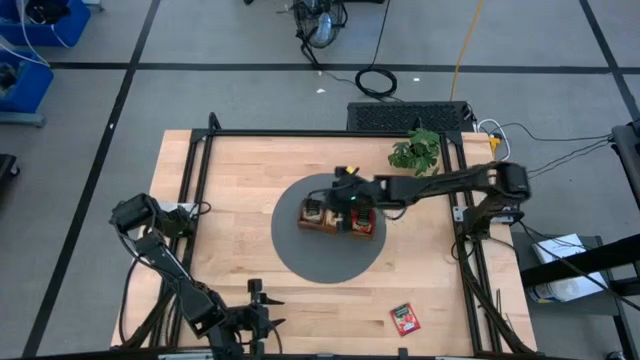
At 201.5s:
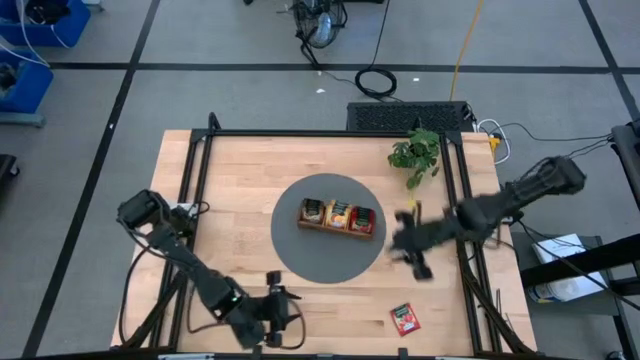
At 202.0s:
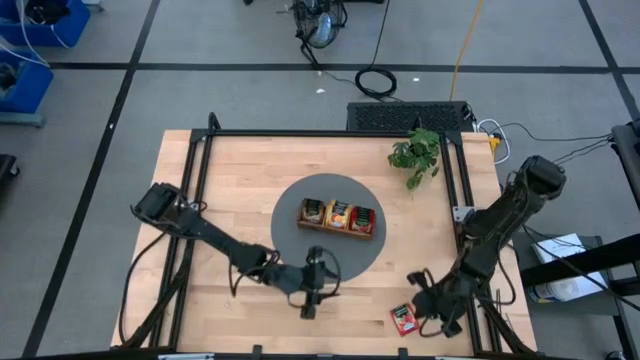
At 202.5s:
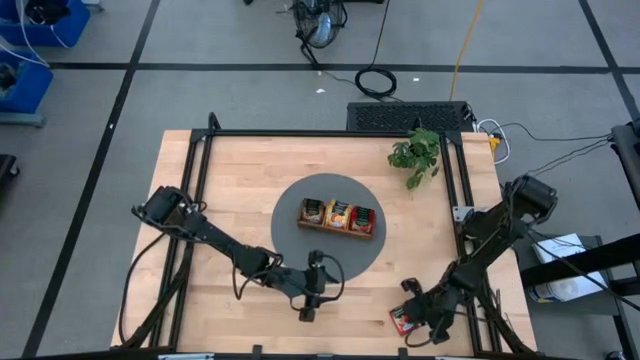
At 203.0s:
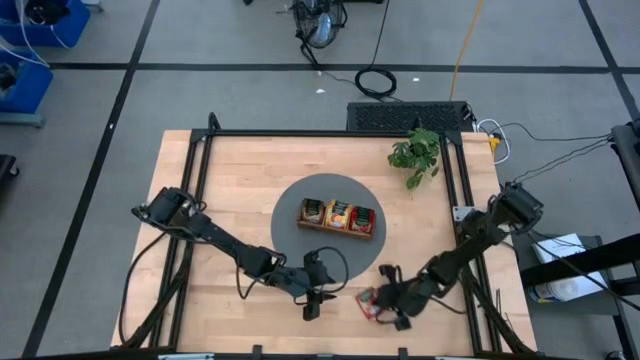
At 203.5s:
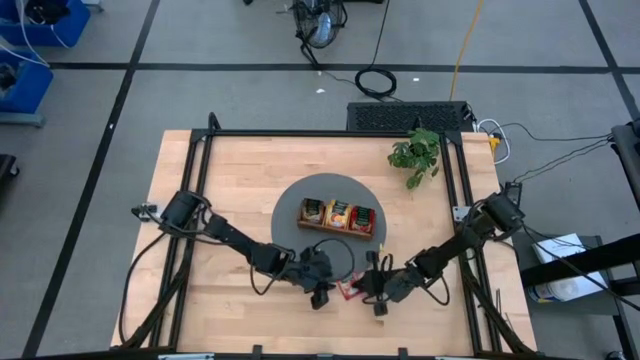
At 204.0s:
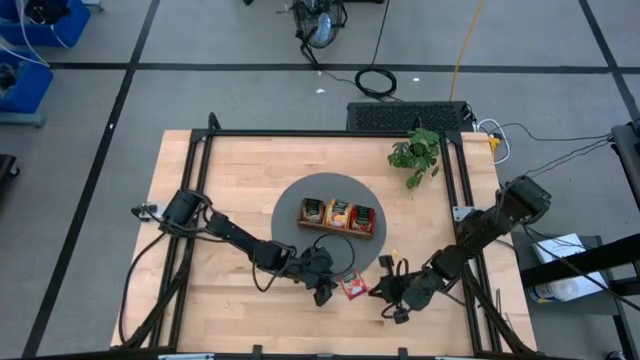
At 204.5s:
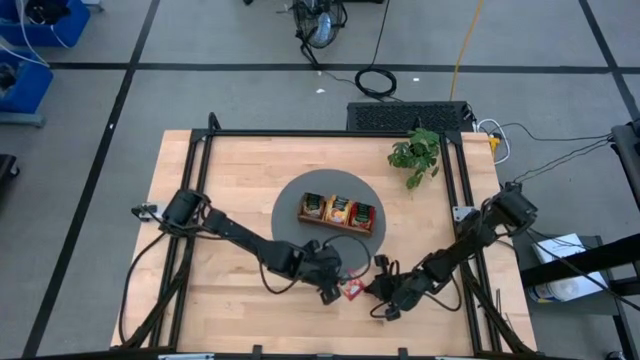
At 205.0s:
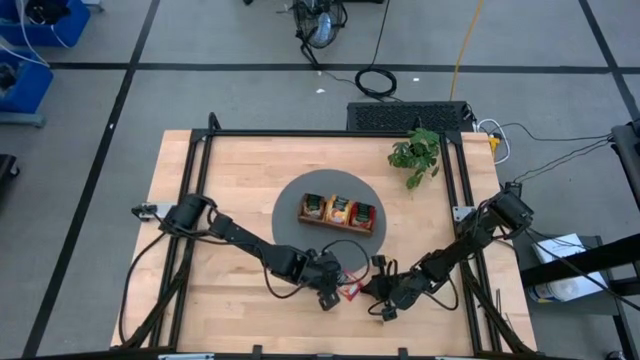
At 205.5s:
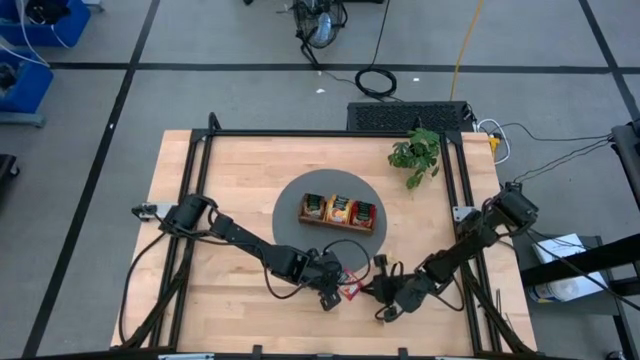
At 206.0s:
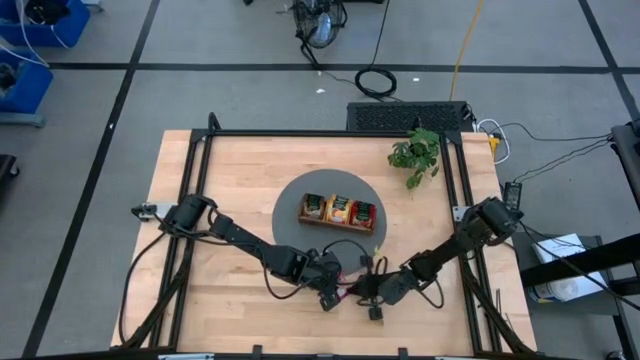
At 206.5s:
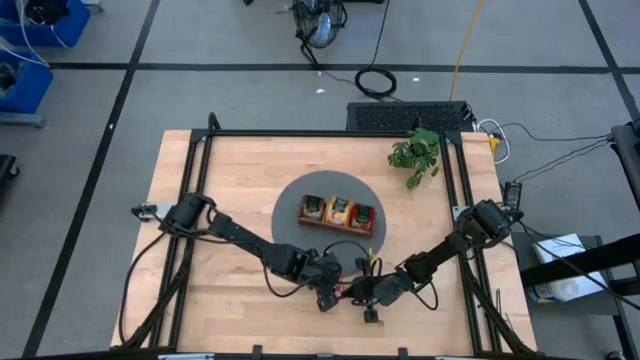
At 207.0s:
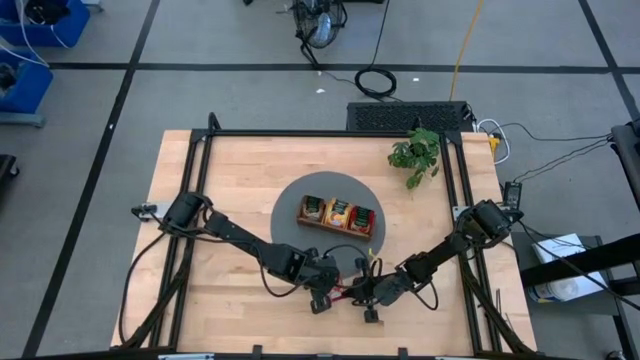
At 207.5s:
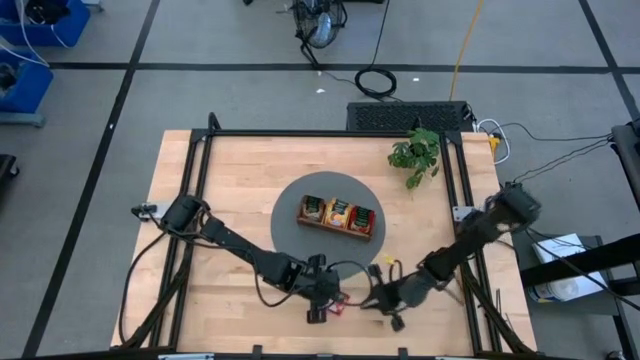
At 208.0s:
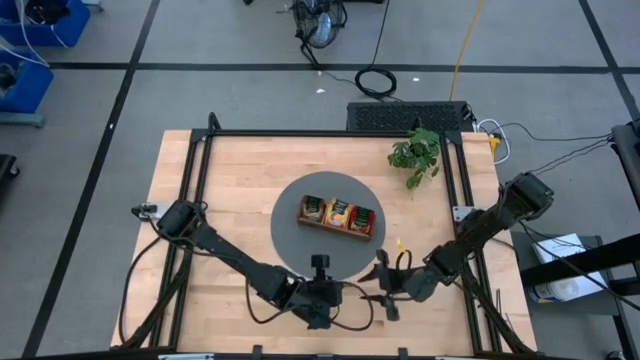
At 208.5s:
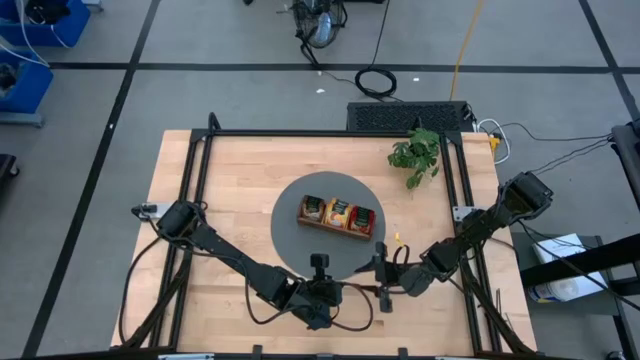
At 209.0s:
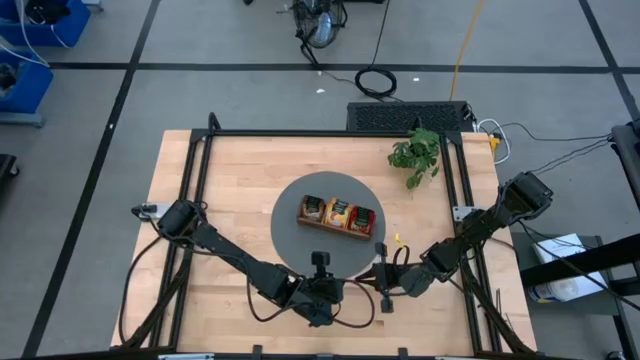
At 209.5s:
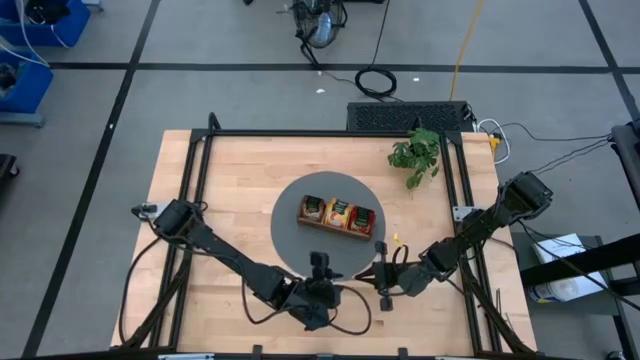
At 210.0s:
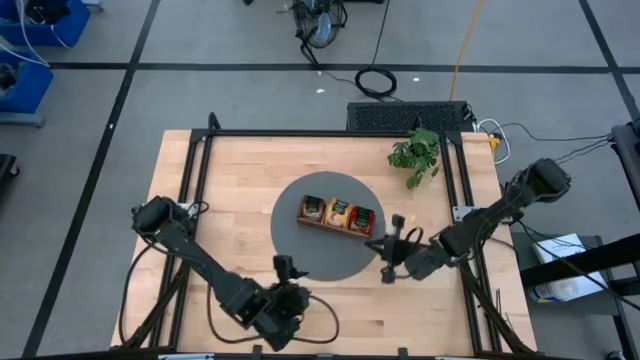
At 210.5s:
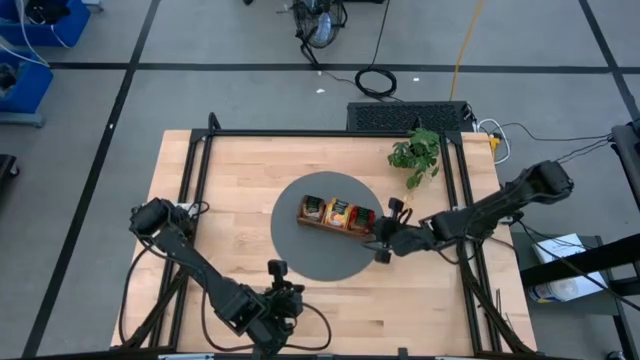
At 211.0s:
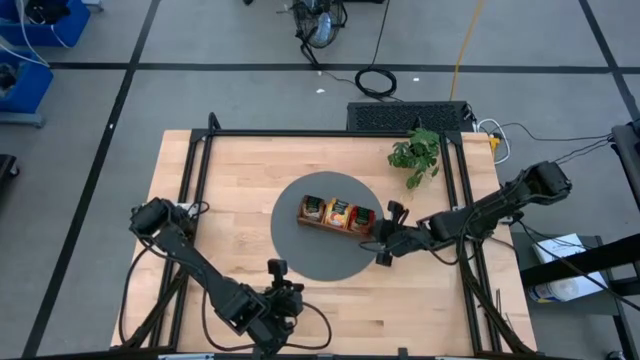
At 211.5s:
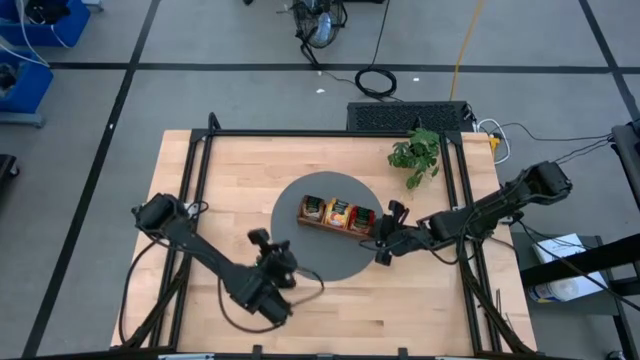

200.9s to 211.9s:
Task: Pick & Place Tea
Put the red tea bag into the right compartment of the wooden organizer

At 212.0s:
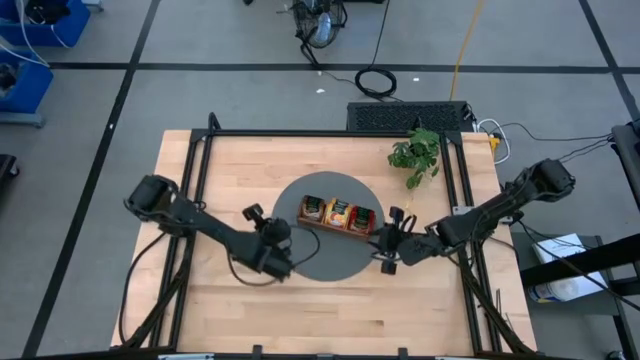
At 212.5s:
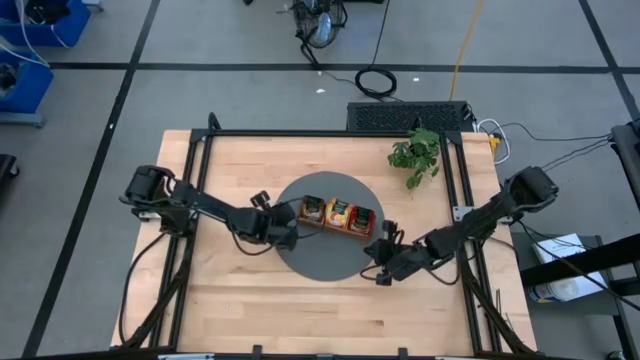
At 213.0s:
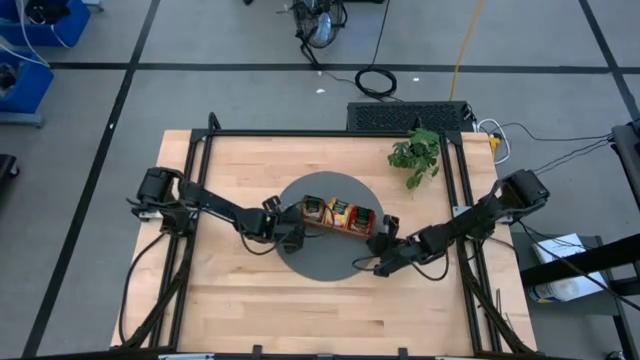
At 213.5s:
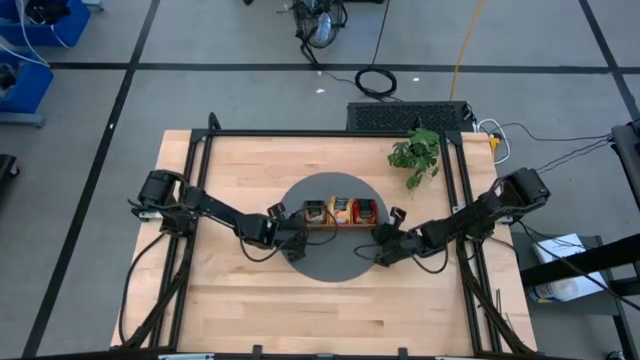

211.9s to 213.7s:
Adjust the wooden organizer

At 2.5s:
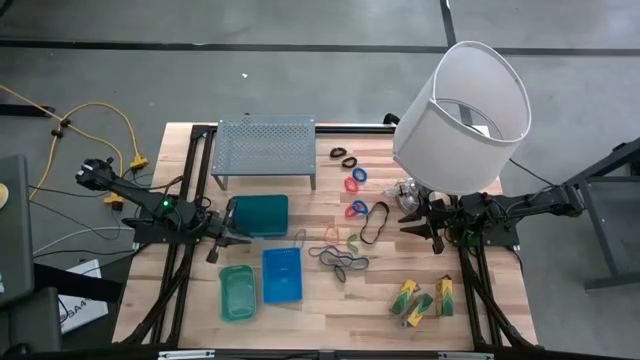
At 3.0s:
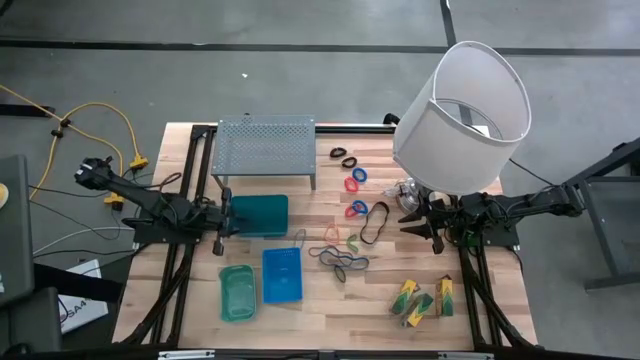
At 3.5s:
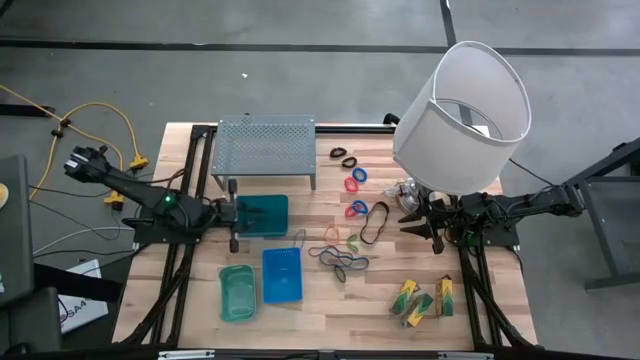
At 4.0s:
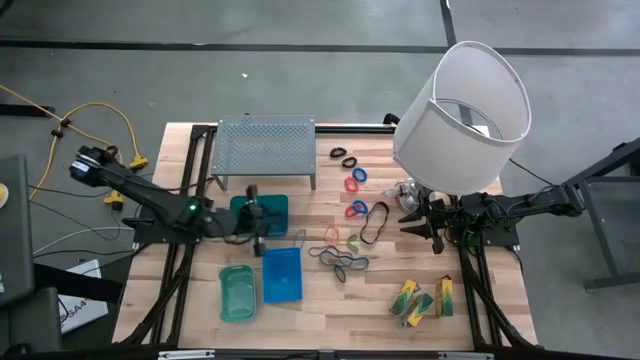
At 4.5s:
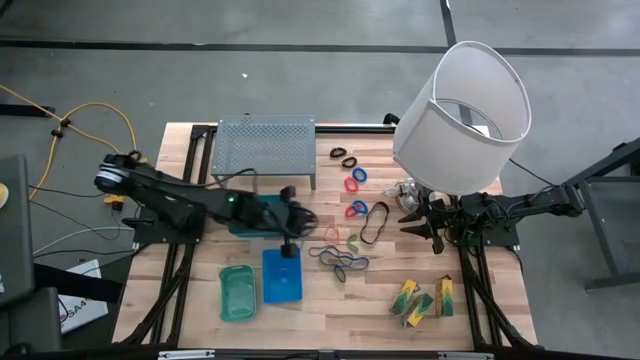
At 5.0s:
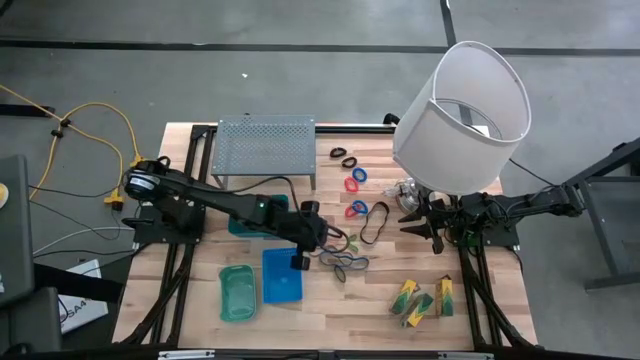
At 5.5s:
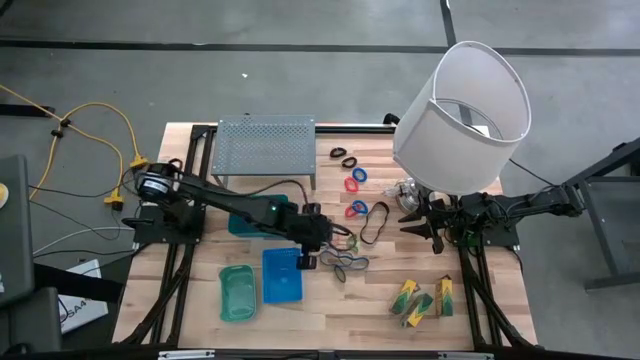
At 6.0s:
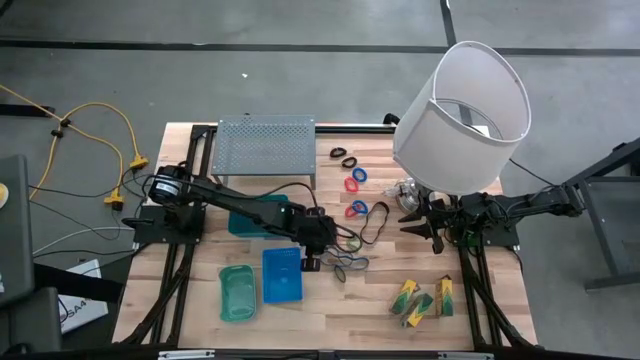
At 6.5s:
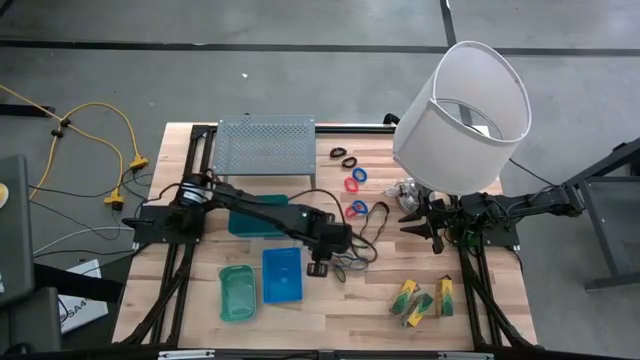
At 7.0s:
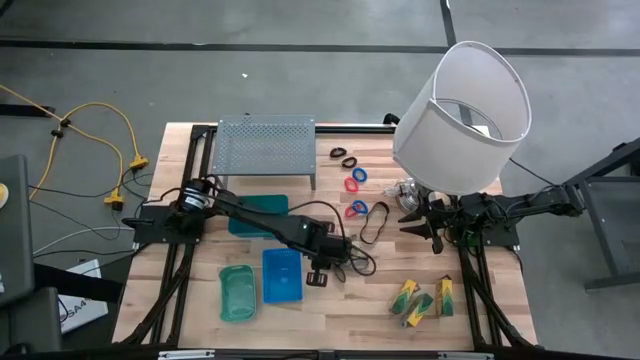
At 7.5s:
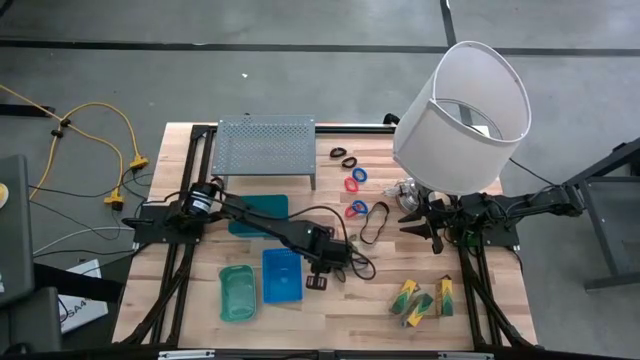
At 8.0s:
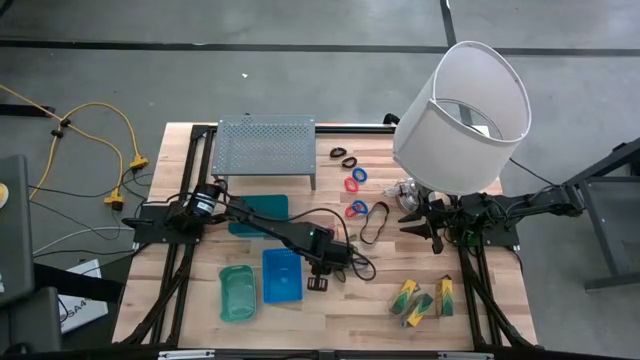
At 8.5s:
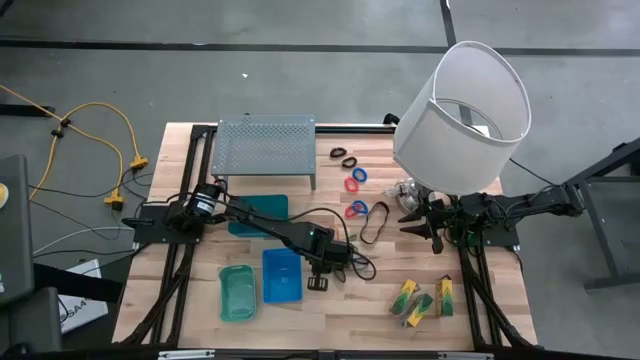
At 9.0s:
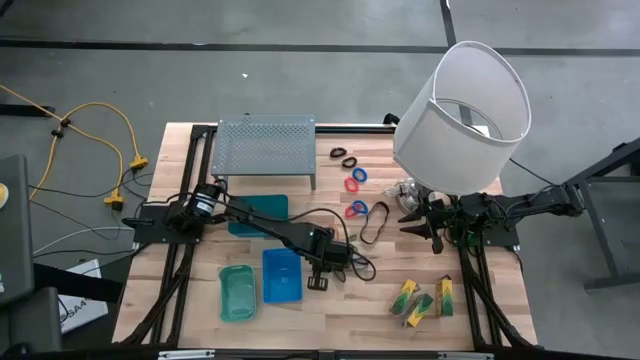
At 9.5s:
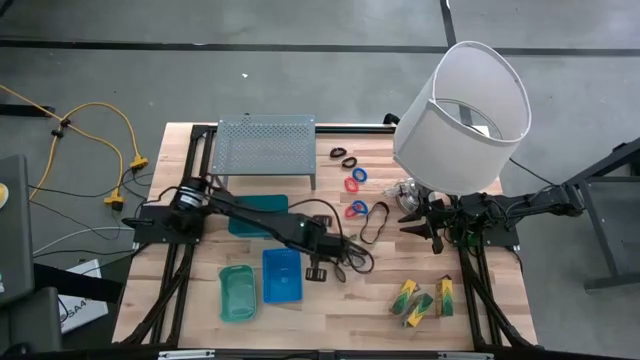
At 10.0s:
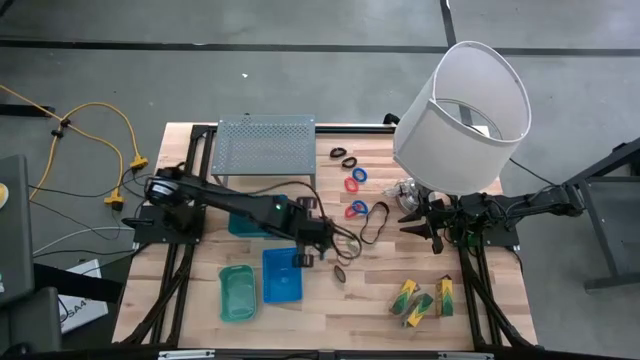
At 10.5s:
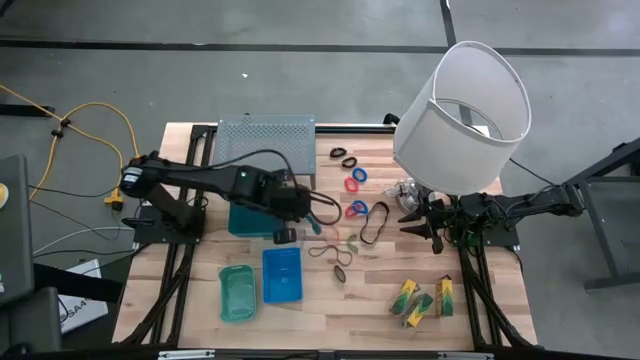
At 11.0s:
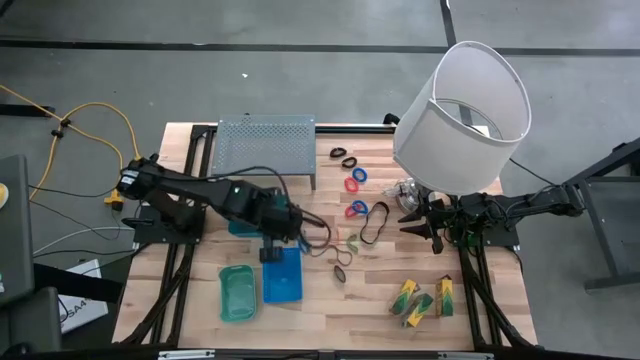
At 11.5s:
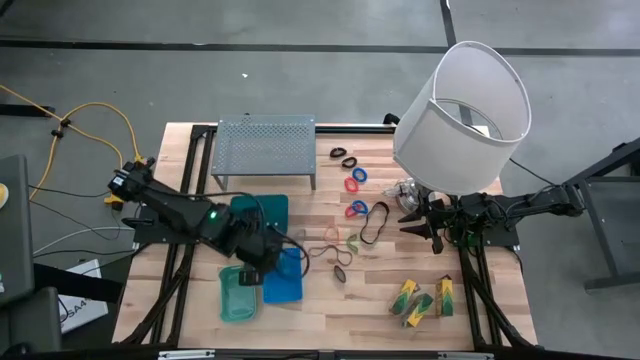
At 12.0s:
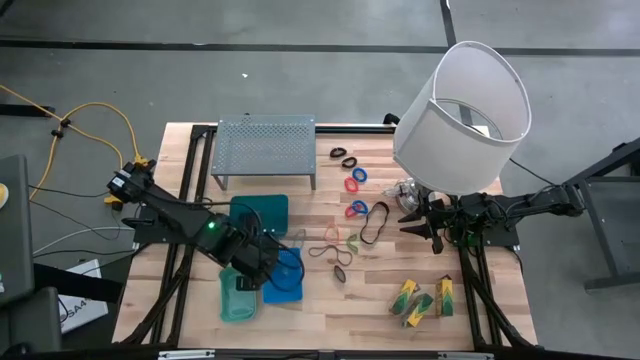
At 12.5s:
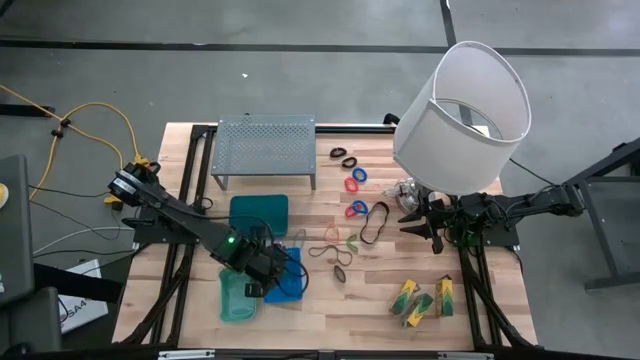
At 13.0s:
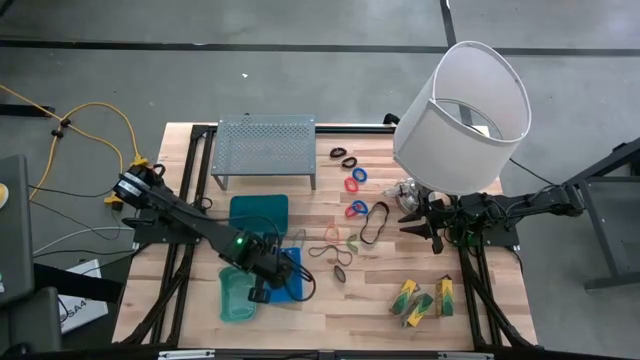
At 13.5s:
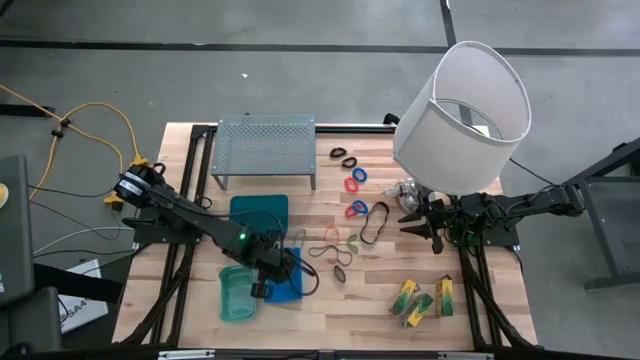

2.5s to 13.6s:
Task: Pick & Place Office Desk Supplies
Put the blue rubber band into the bottom blue bin
